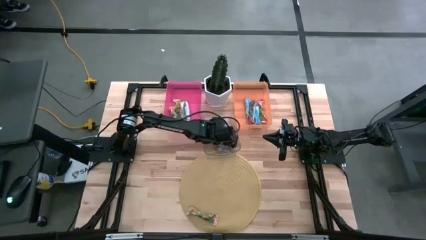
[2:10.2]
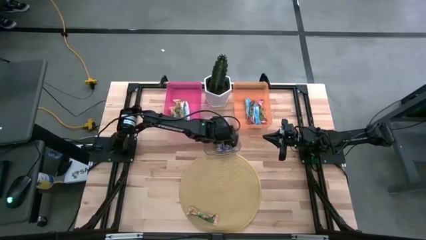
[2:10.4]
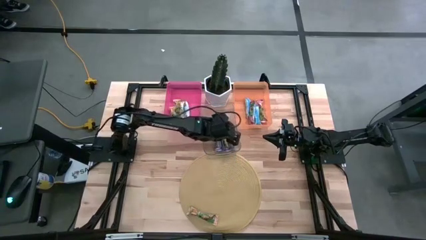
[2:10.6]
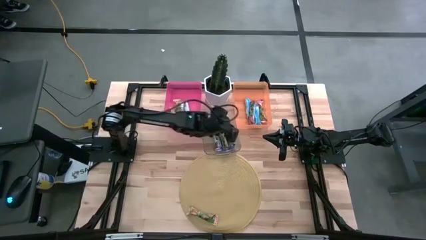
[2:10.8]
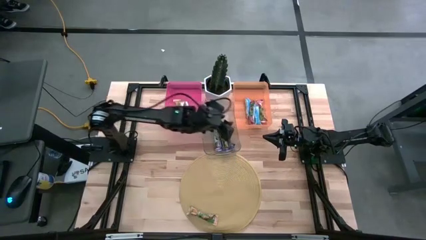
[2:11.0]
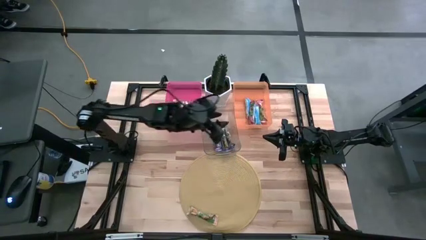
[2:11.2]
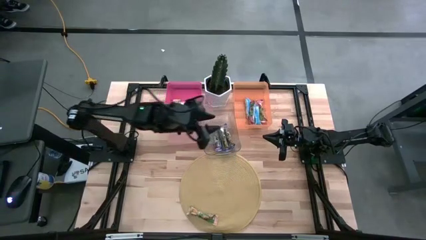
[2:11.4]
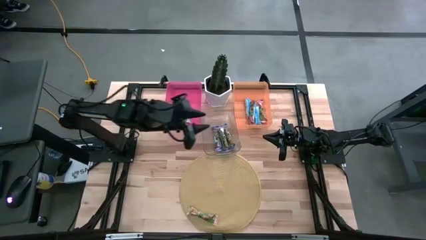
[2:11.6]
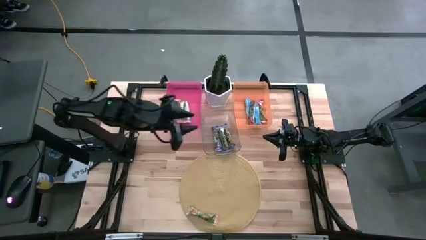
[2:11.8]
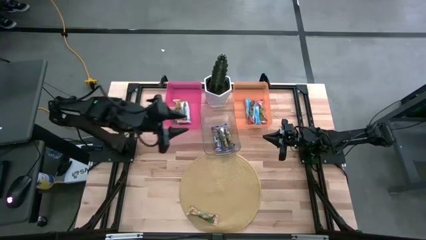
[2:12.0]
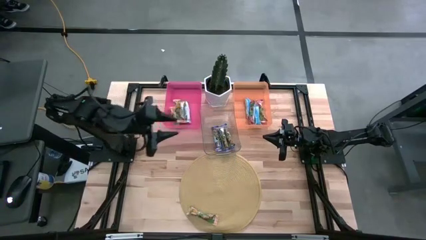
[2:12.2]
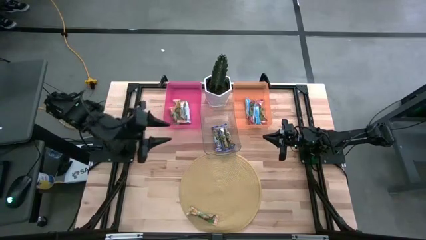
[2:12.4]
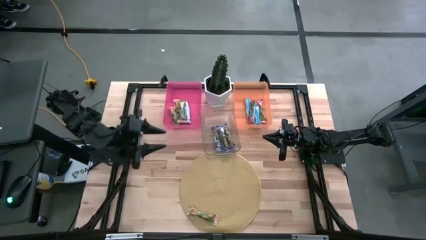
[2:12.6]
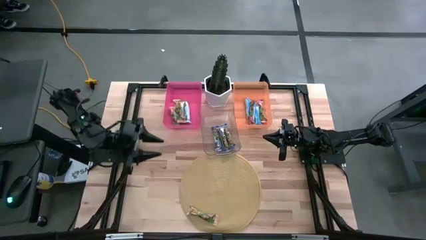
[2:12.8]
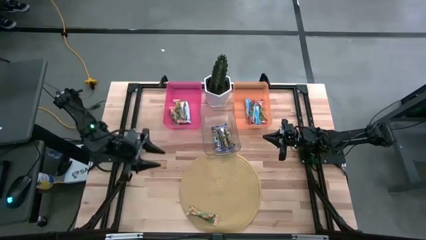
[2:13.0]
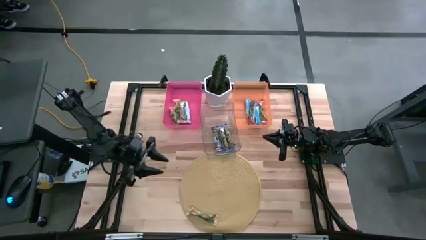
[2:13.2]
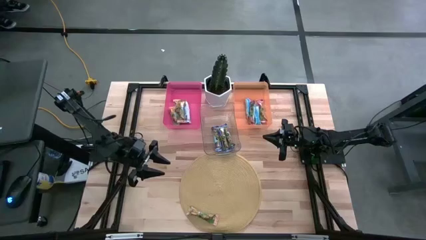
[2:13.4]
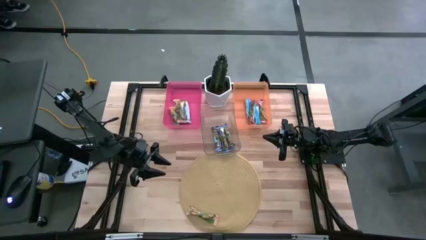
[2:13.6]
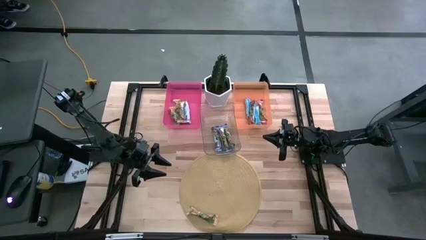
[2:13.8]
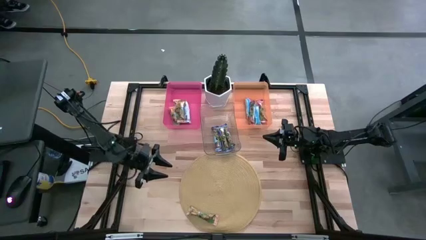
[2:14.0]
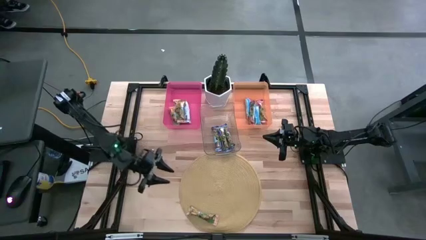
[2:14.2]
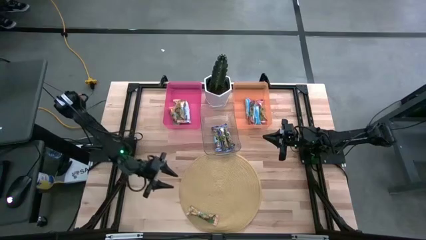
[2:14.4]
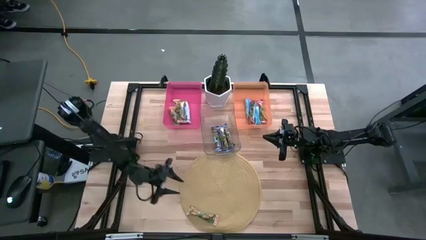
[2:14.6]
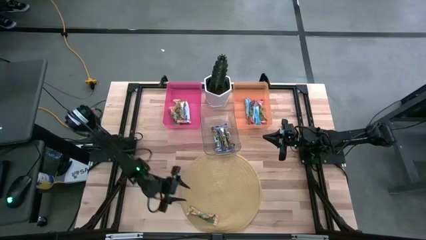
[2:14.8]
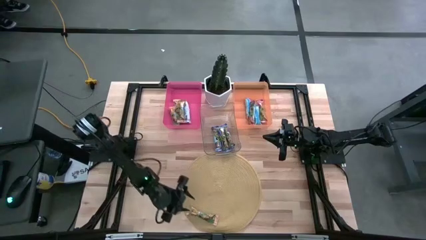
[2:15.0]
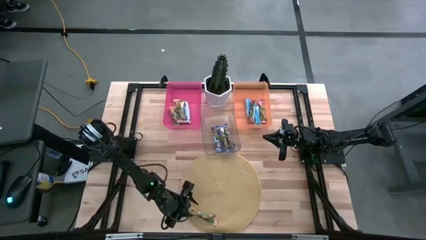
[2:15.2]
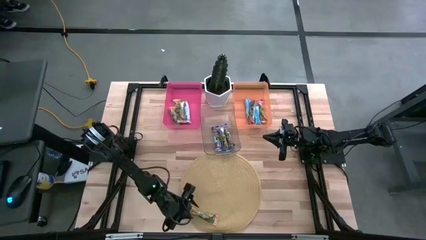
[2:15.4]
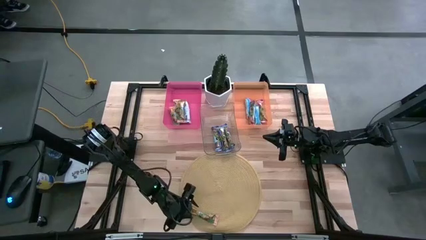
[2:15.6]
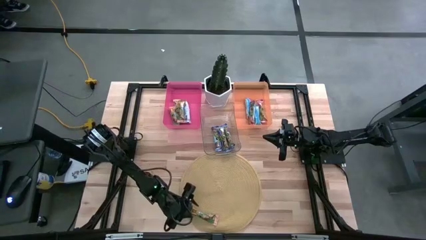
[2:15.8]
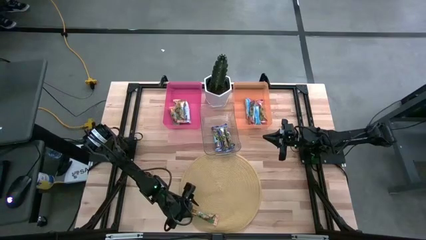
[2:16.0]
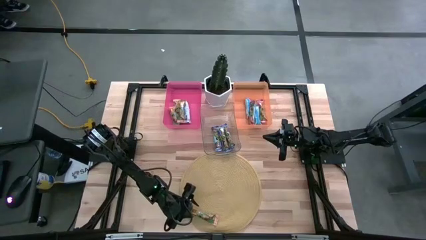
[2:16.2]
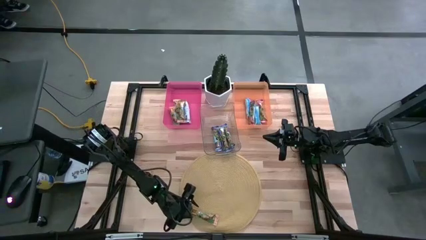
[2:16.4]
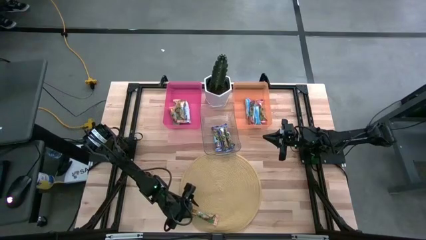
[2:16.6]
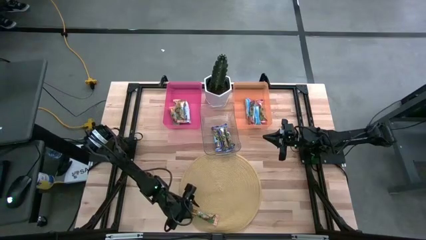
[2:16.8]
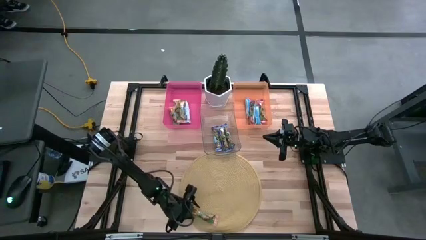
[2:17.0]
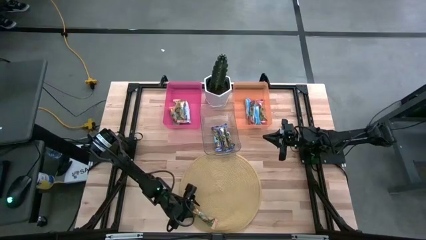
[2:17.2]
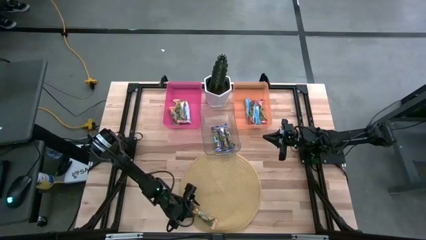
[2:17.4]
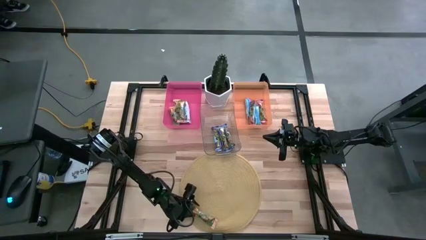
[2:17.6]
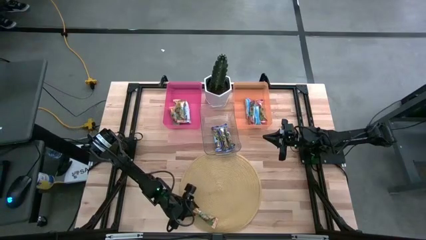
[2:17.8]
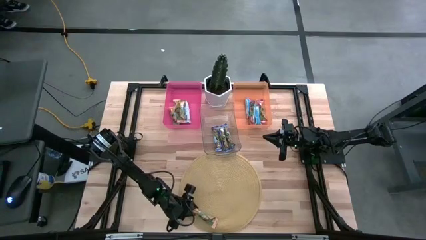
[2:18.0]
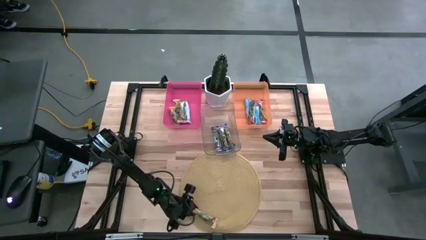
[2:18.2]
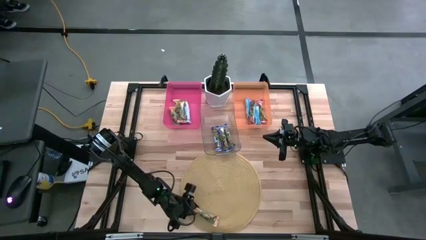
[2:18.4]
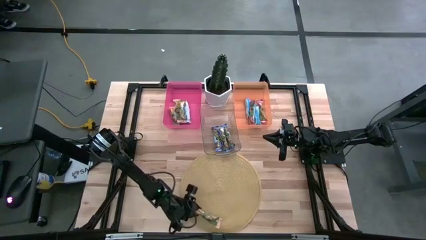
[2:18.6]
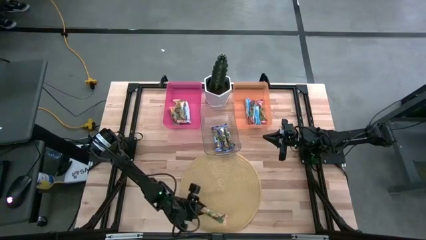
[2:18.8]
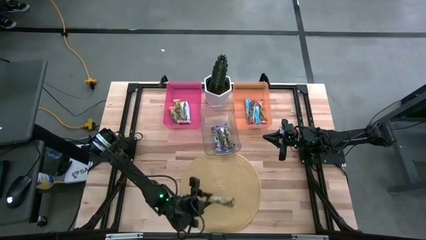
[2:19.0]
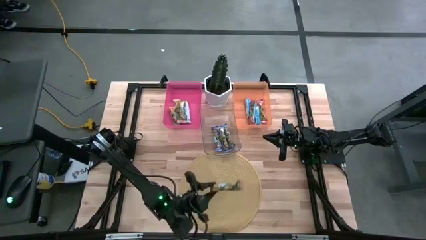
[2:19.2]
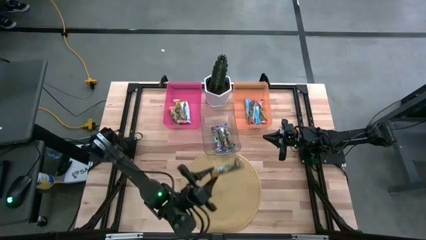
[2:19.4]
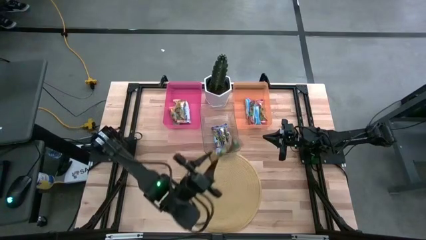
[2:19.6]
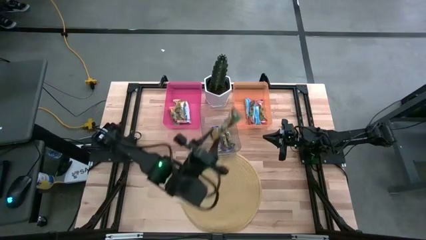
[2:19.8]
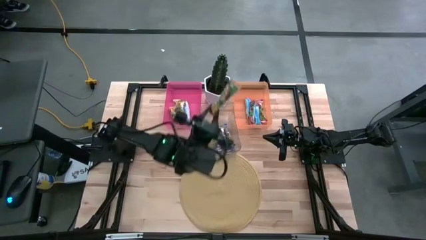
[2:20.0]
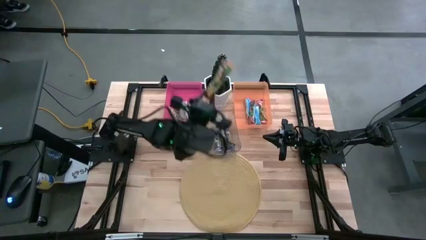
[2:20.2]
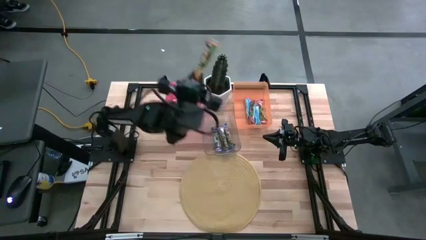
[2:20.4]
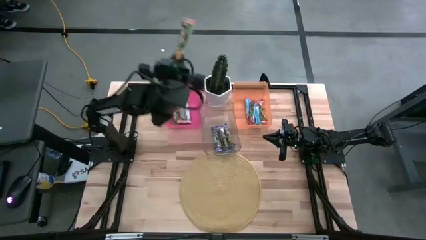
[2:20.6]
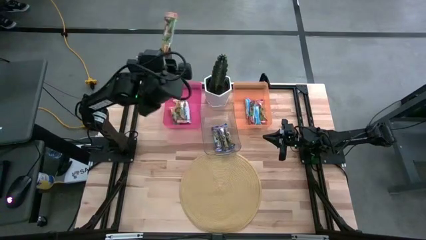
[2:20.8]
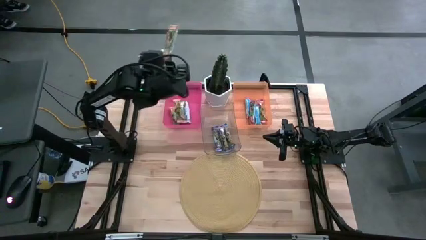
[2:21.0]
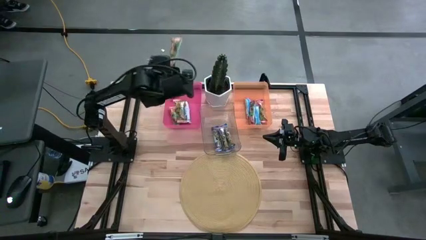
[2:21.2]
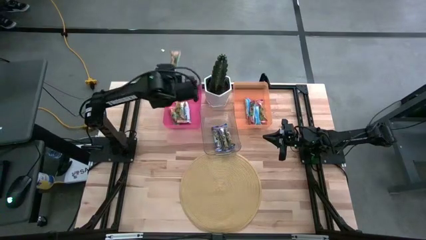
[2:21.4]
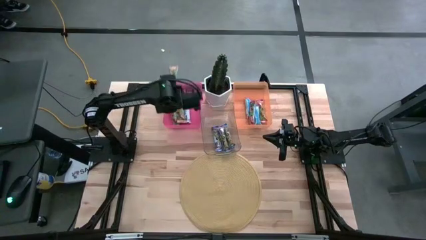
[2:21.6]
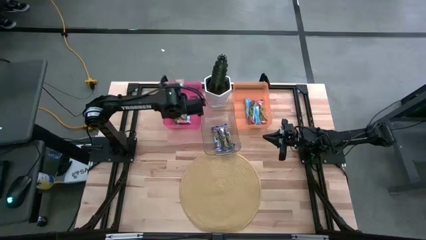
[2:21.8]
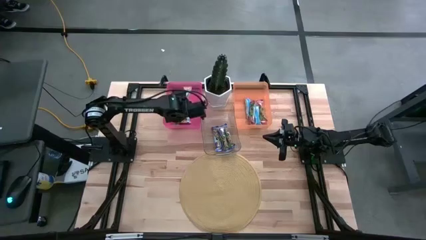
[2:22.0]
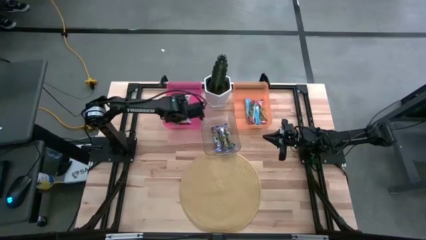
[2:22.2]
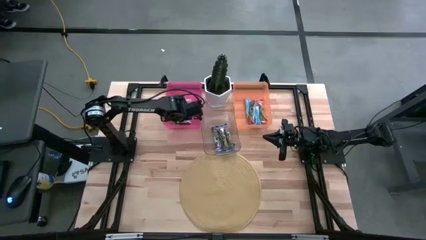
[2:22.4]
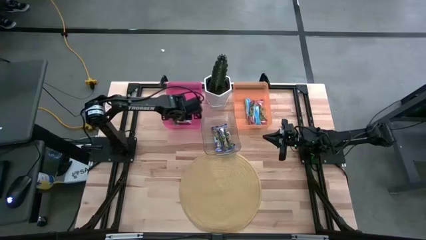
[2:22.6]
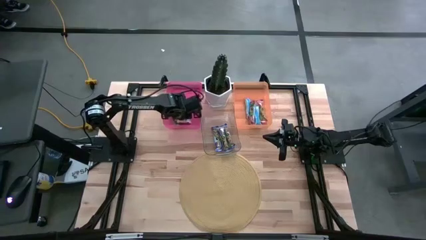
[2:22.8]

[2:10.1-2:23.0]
Task: Pick and place Granola Bars by type
Put the yellow granola bar into the pink bin

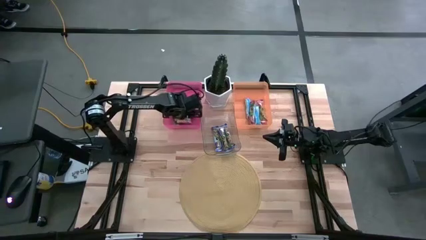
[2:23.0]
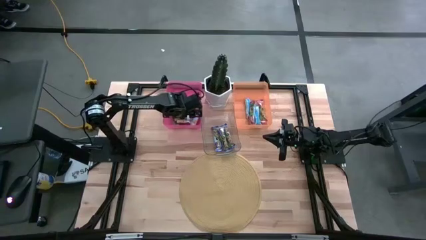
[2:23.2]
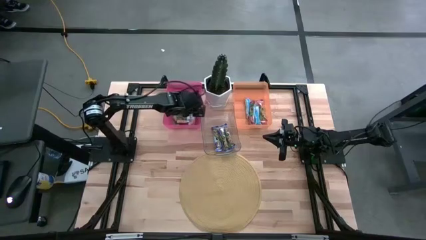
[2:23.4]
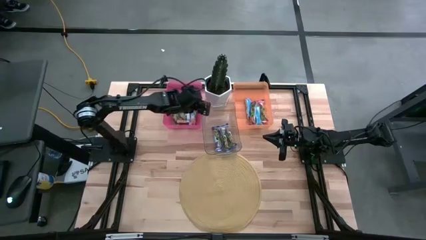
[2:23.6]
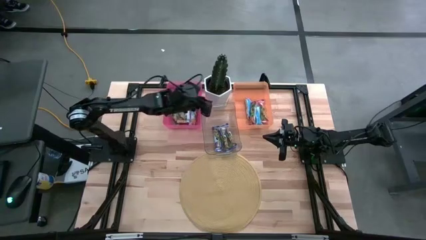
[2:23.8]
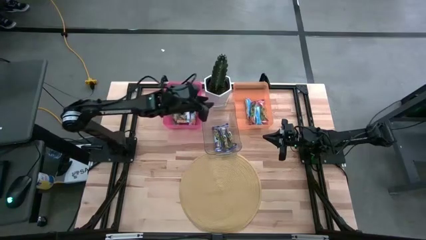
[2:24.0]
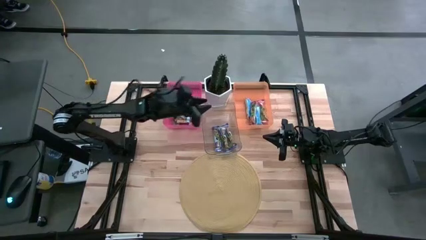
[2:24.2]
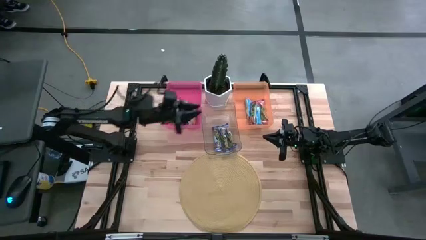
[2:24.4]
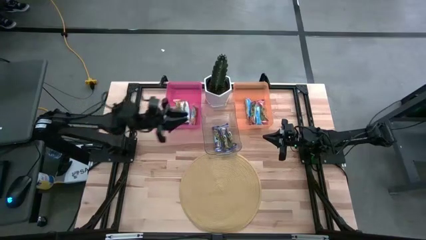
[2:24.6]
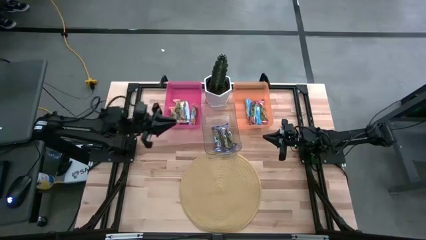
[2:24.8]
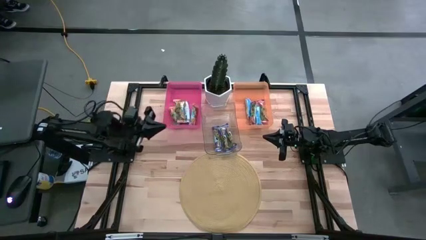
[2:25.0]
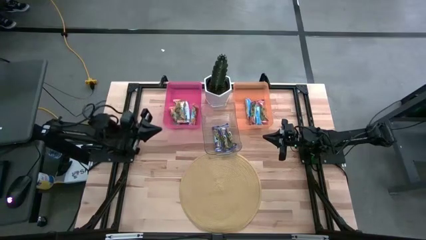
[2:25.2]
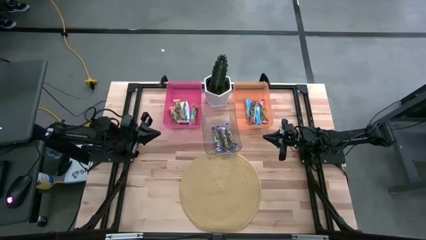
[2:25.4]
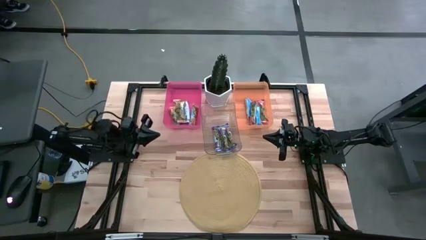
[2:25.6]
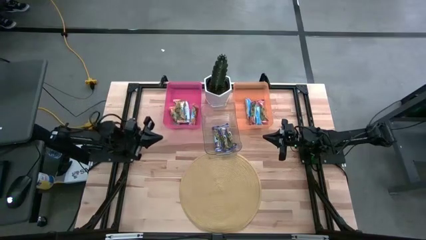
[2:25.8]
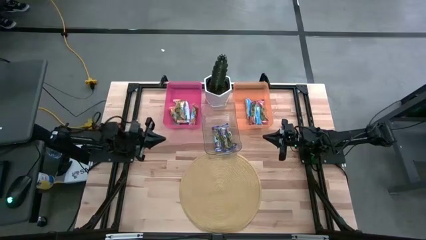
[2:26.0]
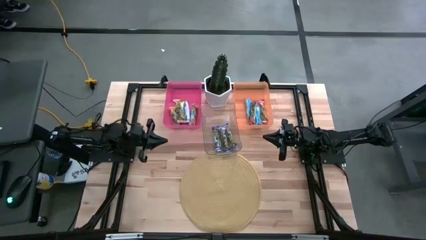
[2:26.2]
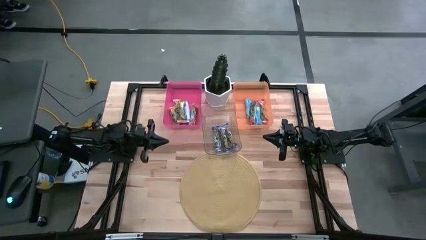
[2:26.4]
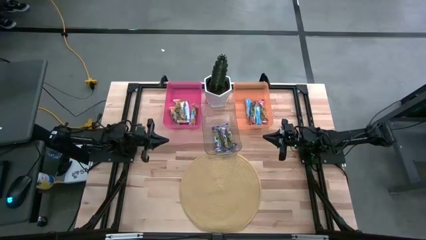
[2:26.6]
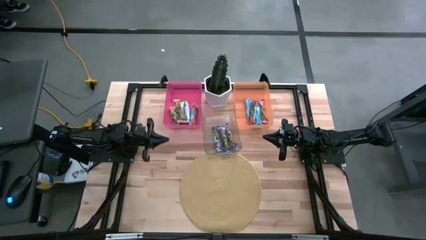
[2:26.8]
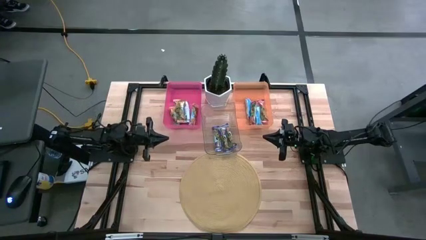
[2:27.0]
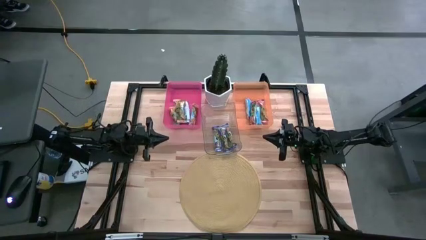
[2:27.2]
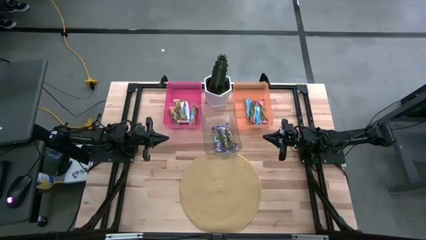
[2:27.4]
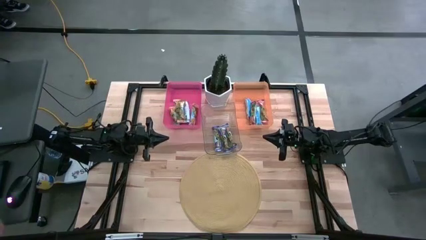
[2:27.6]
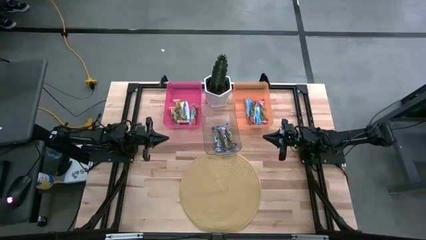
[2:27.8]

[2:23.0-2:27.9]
Return to Home Position
